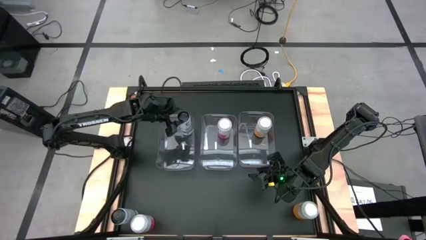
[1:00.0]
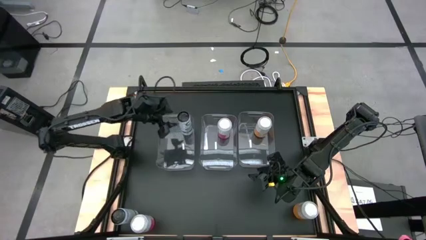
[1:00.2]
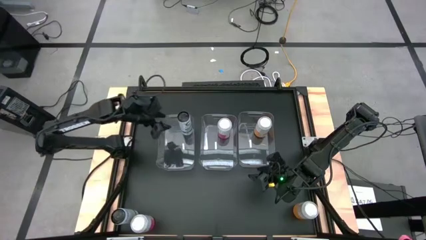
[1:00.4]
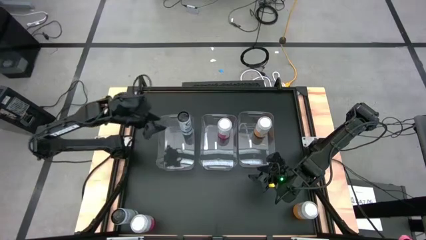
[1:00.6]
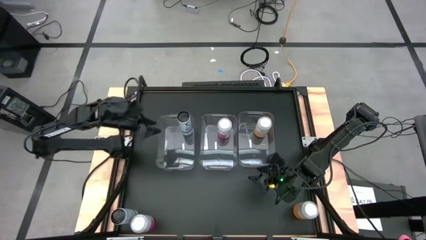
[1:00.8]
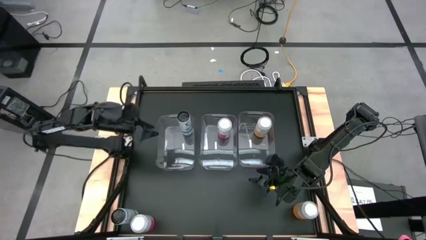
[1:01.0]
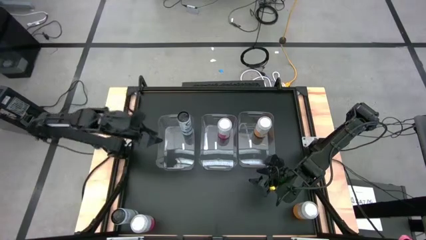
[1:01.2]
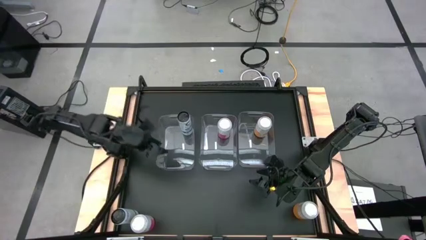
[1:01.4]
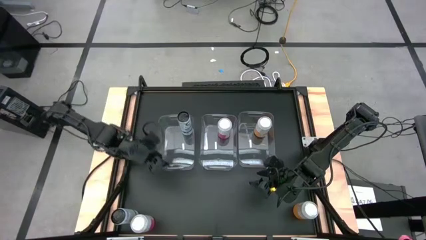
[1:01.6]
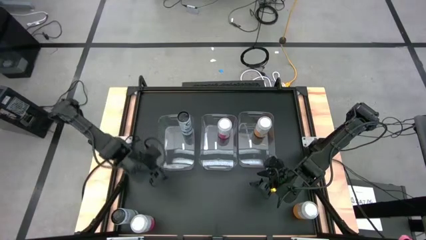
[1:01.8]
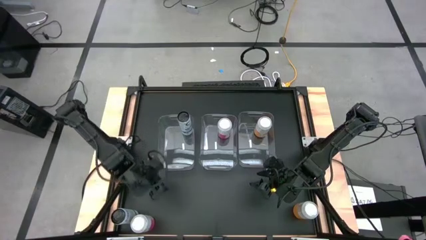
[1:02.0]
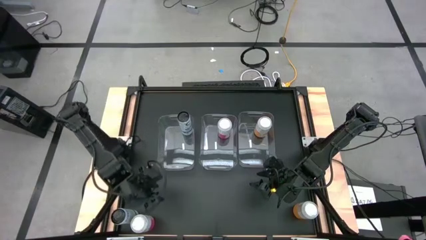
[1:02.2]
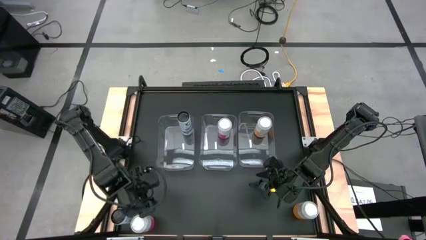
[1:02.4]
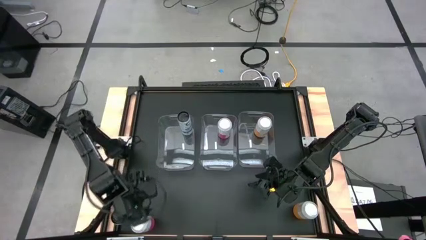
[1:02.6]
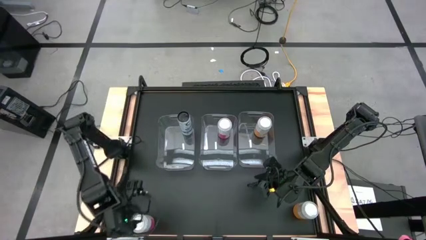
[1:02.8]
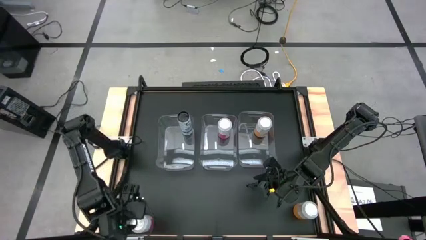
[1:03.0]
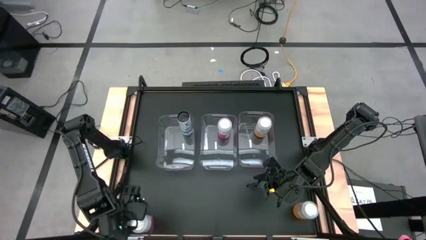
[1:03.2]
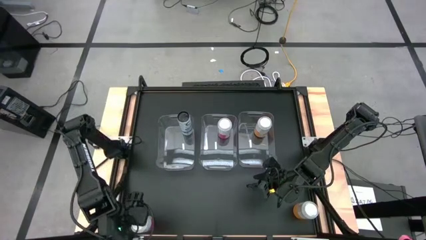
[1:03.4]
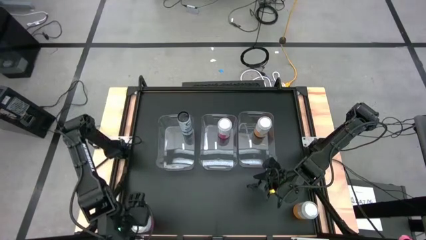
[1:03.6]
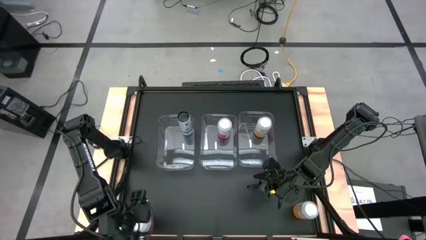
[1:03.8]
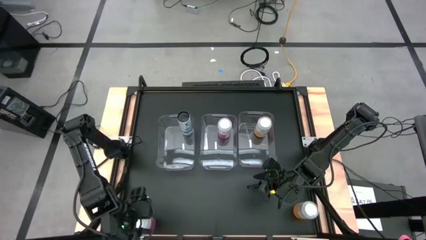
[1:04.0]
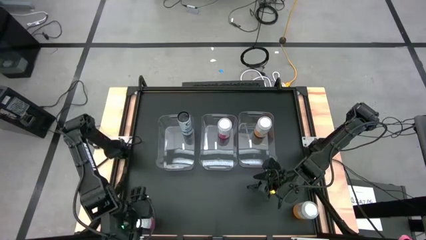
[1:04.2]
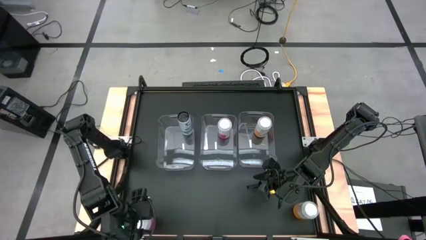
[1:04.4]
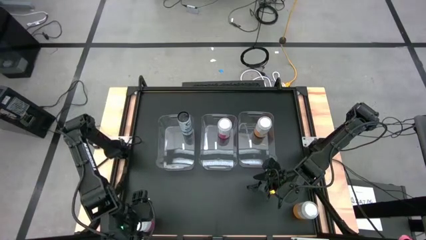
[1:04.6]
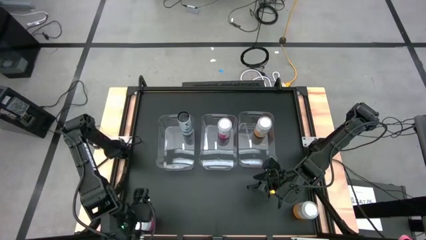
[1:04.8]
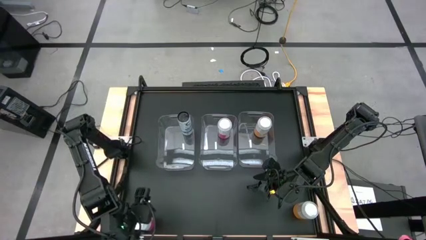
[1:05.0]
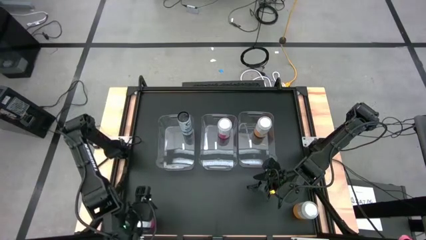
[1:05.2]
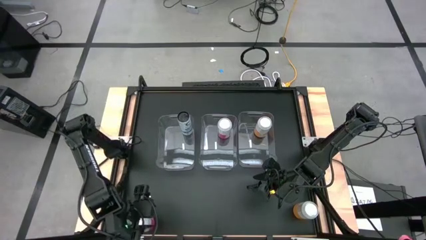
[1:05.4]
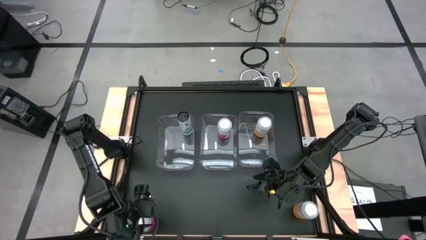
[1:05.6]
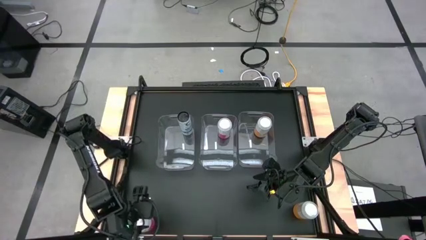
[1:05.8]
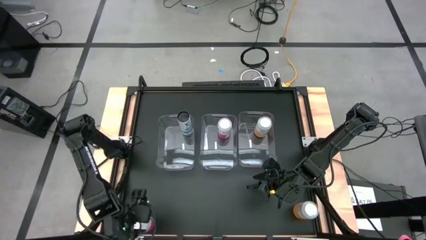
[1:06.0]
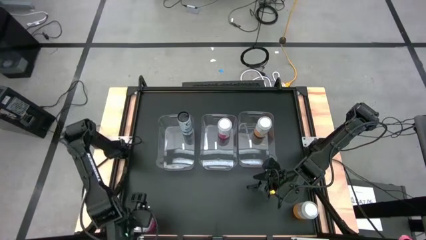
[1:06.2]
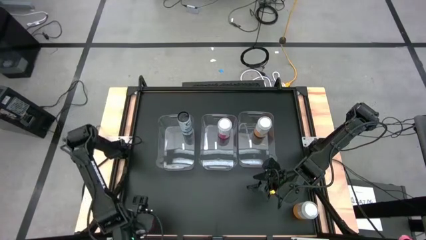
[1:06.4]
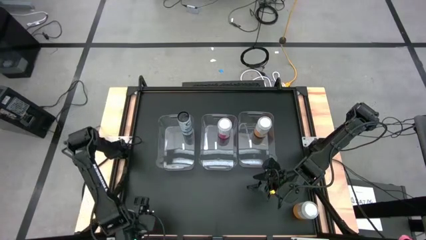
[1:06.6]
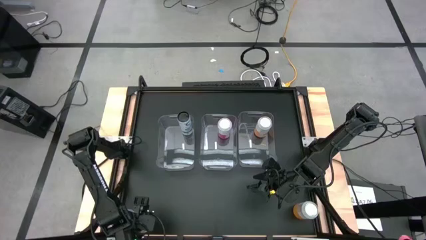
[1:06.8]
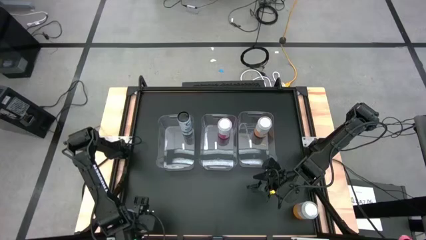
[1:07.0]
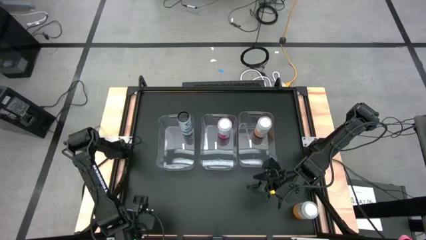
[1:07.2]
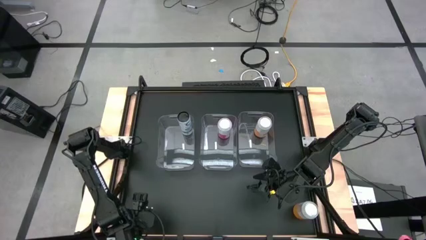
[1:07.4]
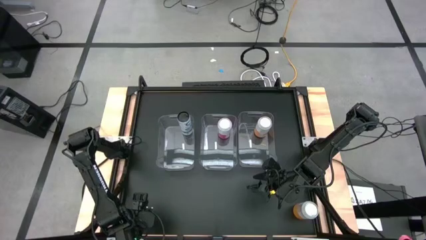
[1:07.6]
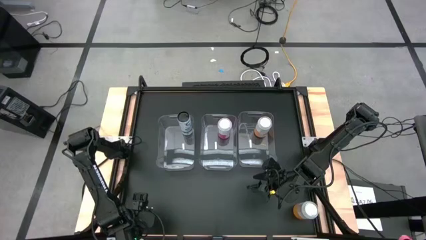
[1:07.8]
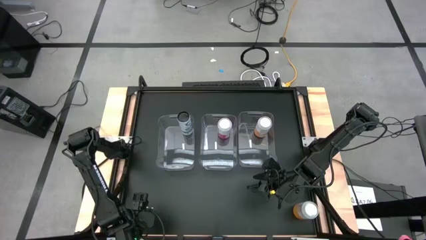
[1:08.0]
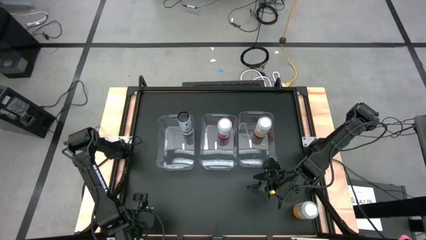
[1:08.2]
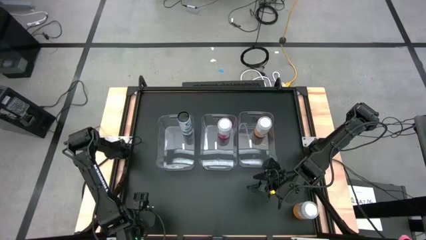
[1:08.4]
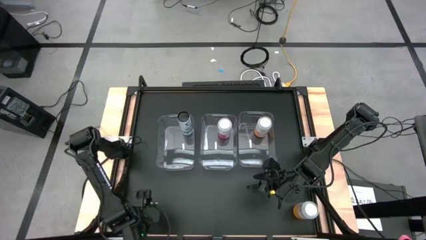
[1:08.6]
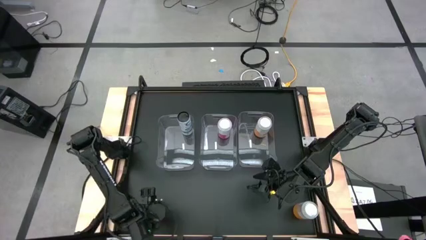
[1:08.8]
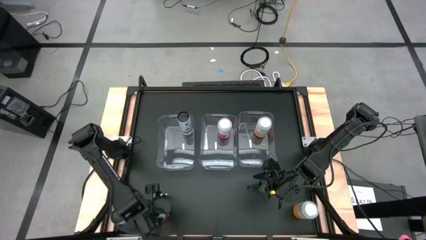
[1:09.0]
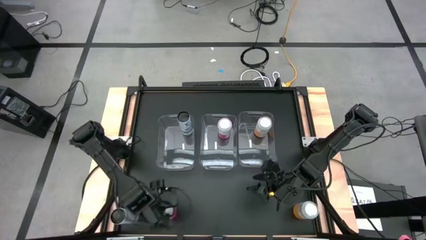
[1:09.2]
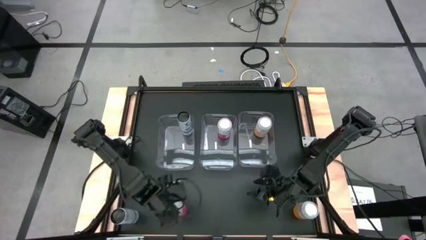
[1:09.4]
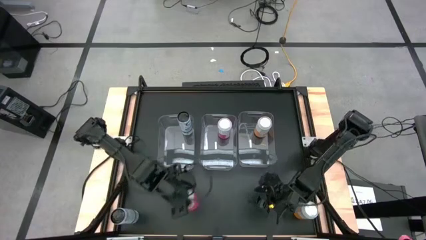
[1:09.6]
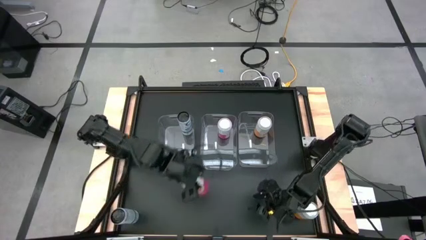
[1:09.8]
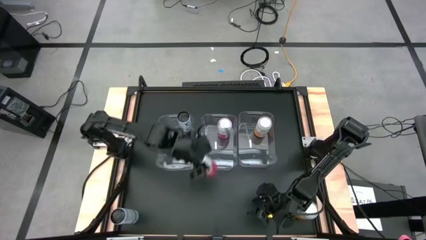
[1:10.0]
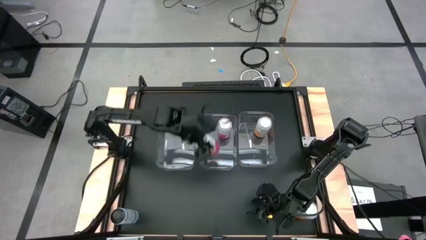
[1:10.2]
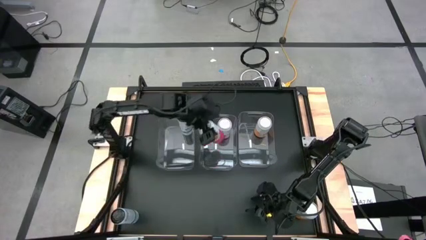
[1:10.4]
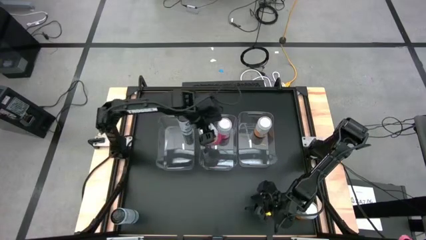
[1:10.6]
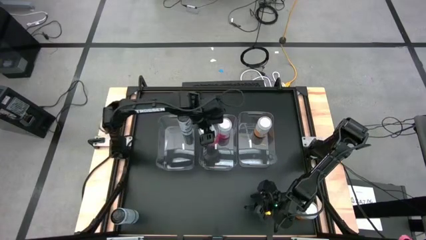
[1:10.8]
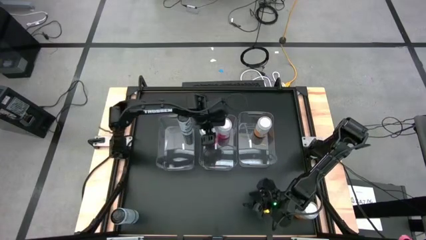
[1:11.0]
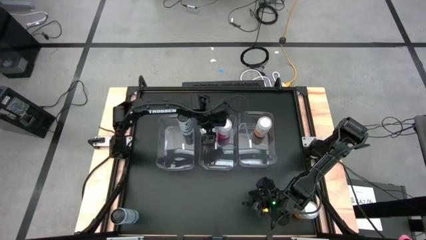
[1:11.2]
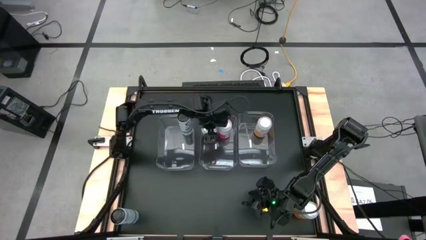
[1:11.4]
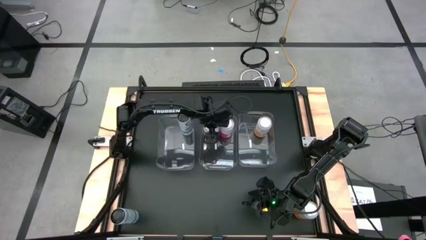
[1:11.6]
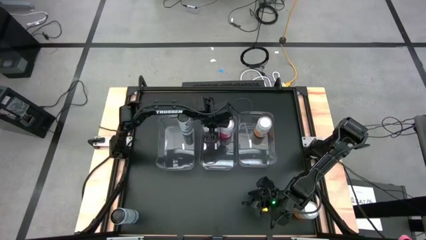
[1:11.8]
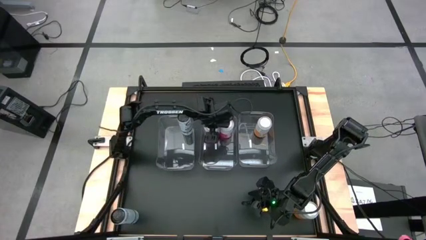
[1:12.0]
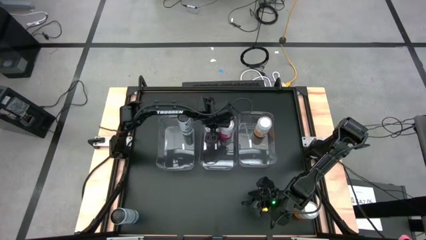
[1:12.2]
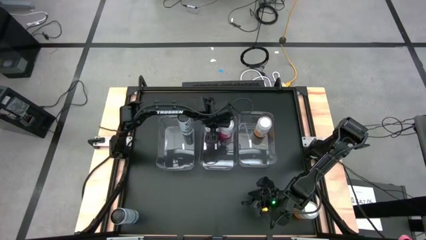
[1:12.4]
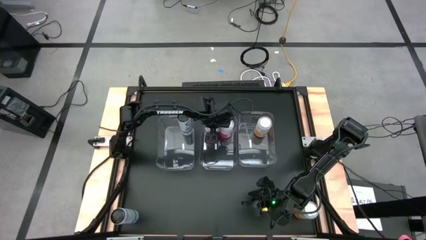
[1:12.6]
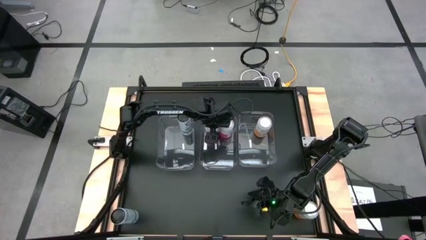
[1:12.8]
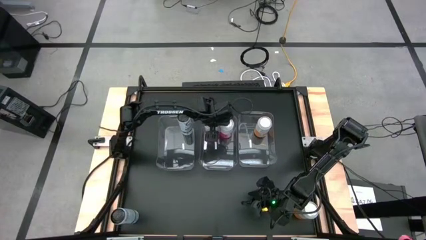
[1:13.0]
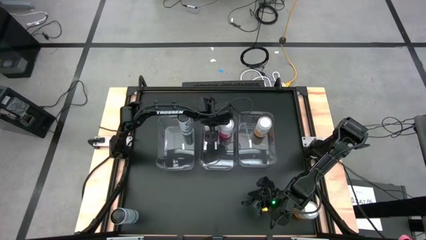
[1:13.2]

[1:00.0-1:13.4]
Task: Sort soda cans
Put the pink-white soda can into the middle transparent bin

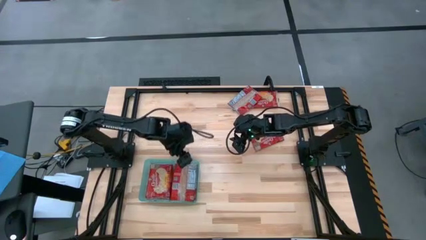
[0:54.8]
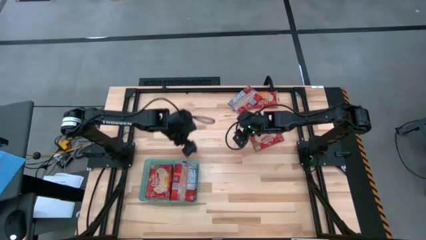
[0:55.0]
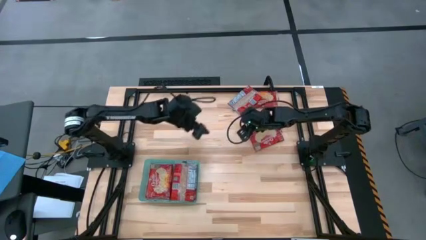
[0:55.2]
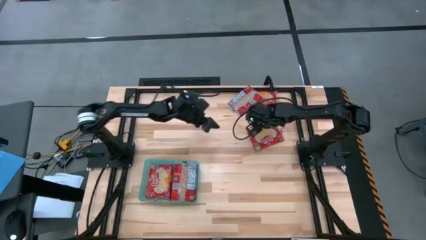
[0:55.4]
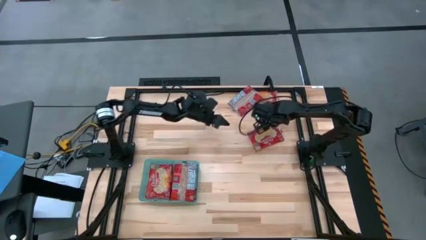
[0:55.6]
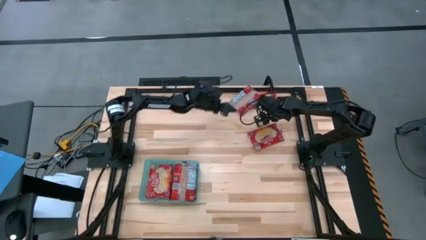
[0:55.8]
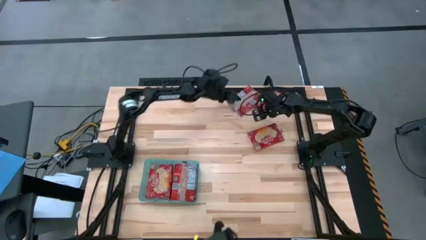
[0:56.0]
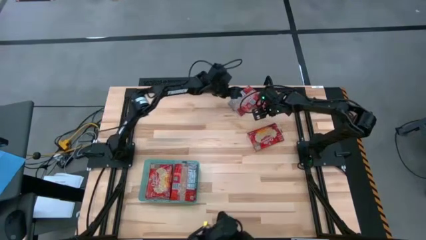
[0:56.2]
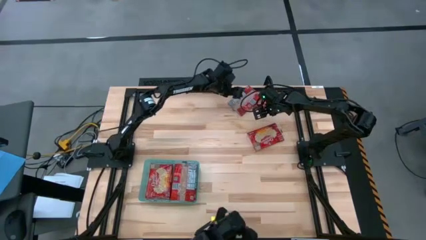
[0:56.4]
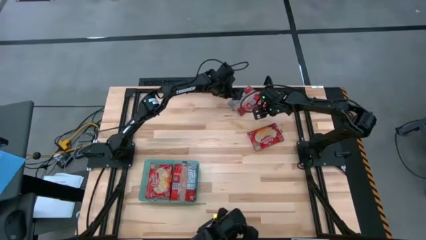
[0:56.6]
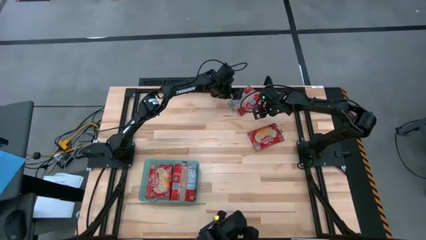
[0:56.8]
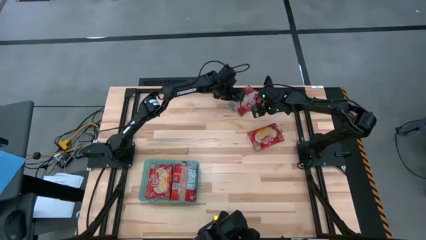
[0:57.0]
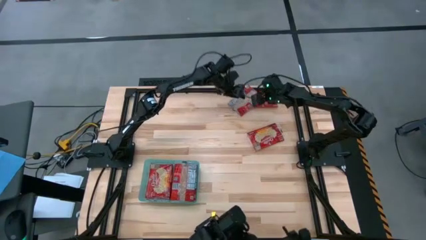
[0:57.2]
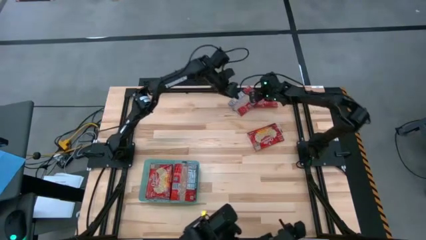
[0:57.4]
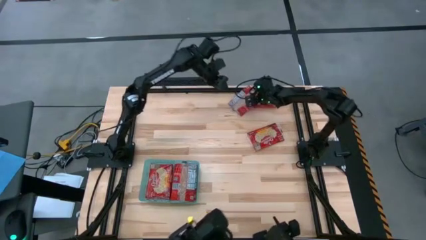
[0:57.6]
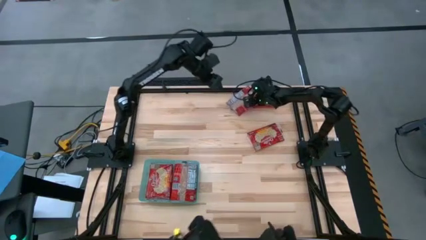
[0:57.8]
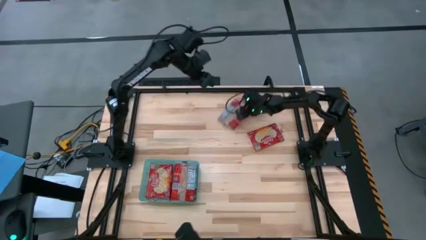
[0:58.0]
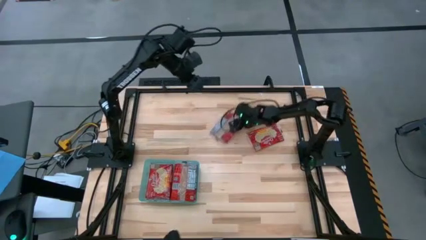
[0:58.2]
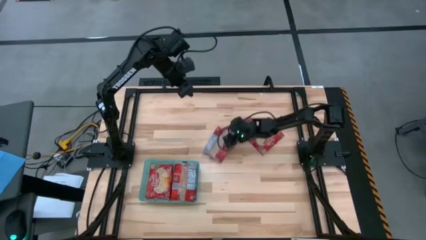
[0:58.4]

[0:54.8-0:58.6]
Task: Sort popcorn bags into baskets
Move the red popcorn packs to the center of the table
